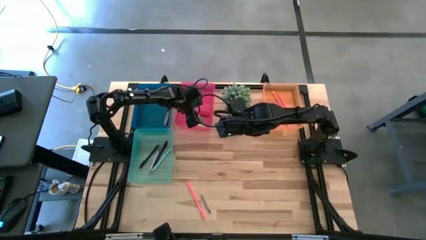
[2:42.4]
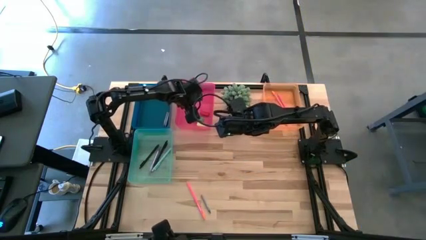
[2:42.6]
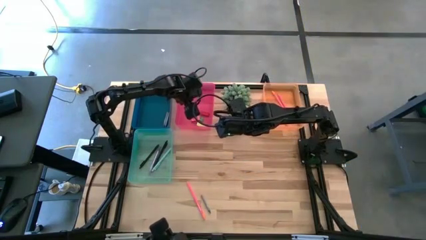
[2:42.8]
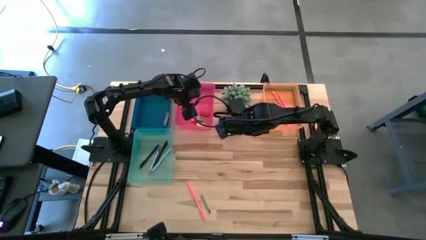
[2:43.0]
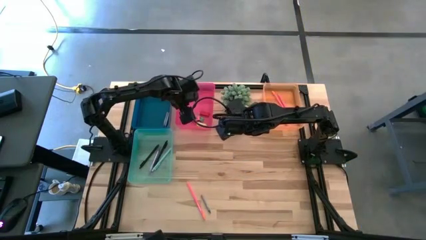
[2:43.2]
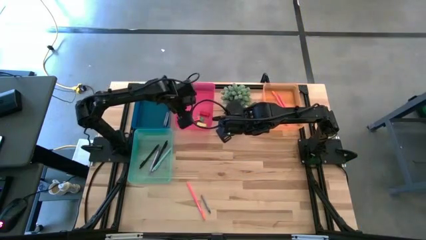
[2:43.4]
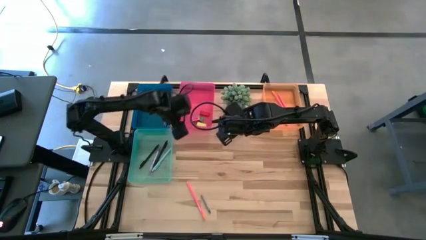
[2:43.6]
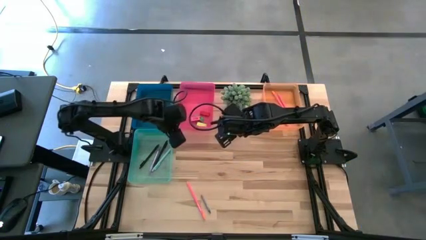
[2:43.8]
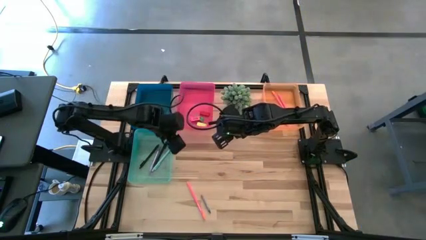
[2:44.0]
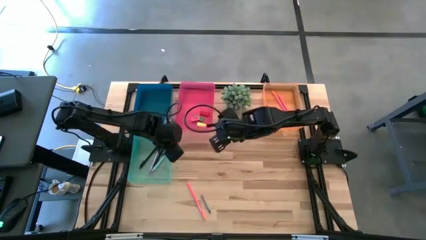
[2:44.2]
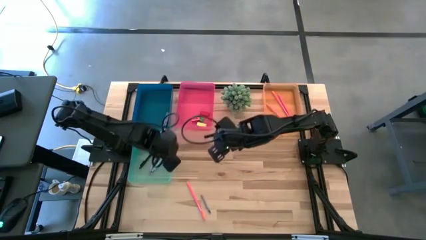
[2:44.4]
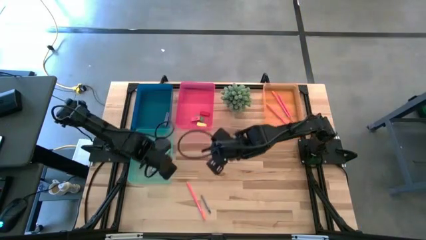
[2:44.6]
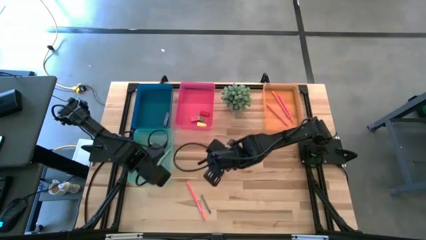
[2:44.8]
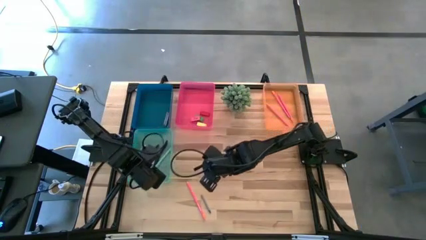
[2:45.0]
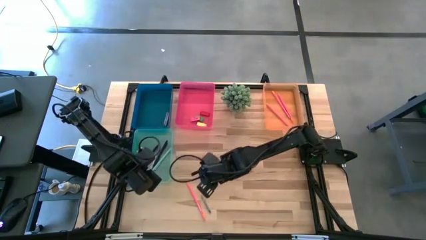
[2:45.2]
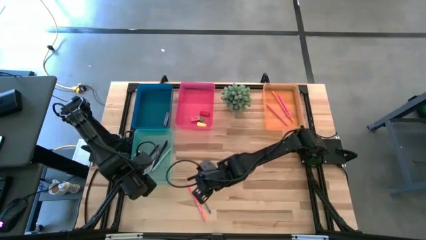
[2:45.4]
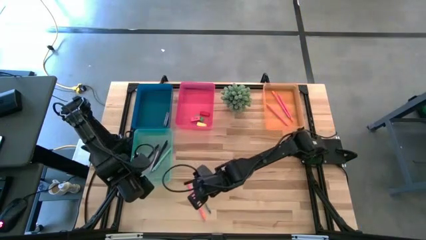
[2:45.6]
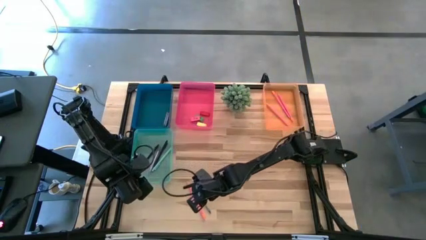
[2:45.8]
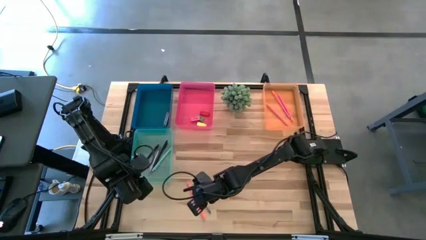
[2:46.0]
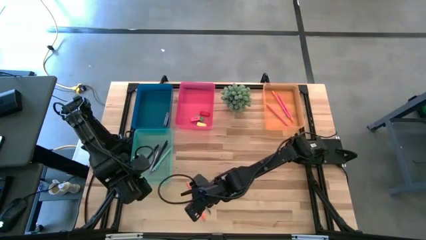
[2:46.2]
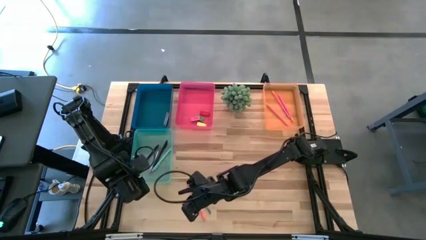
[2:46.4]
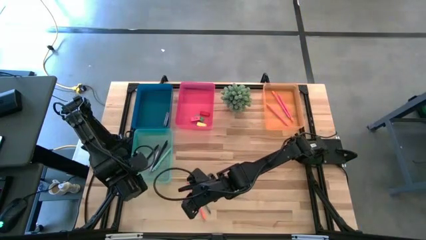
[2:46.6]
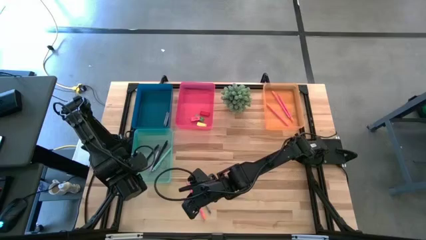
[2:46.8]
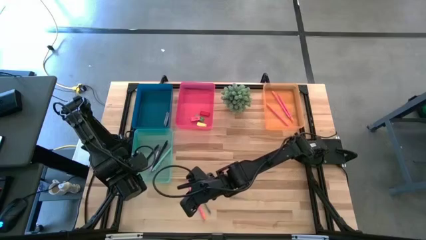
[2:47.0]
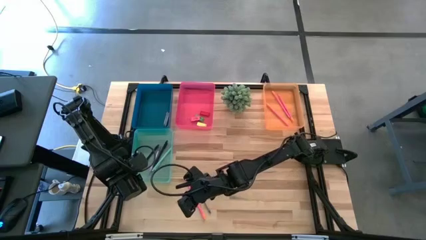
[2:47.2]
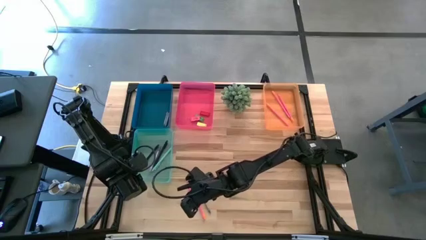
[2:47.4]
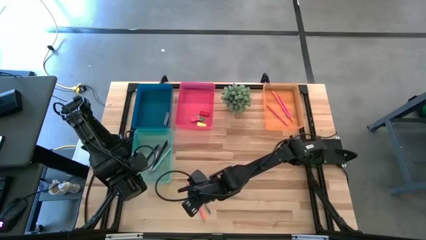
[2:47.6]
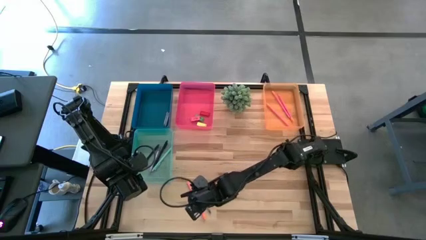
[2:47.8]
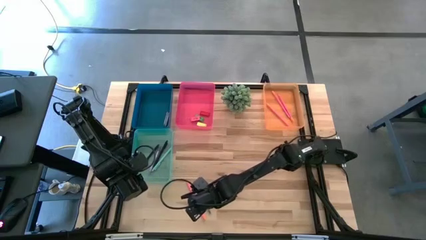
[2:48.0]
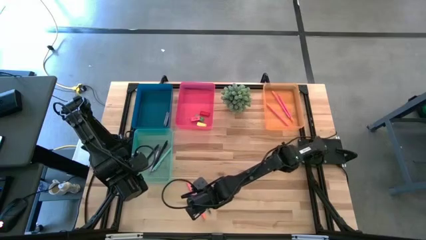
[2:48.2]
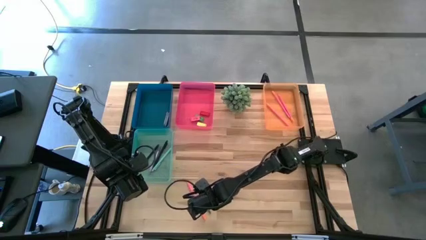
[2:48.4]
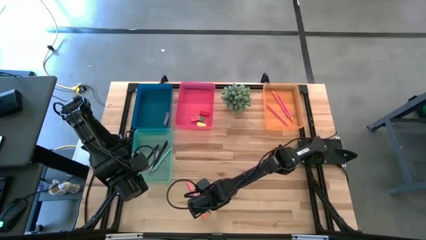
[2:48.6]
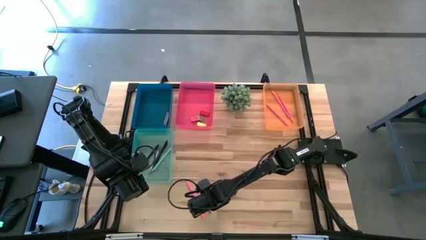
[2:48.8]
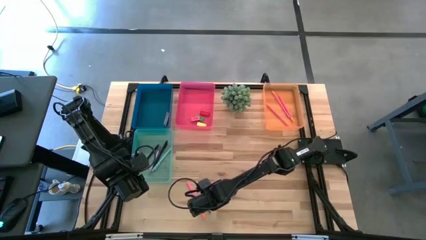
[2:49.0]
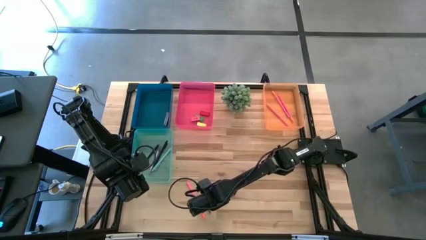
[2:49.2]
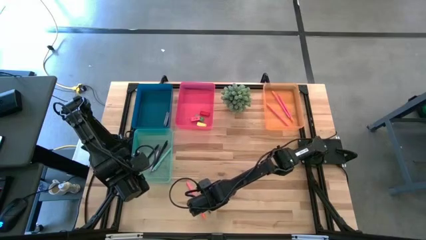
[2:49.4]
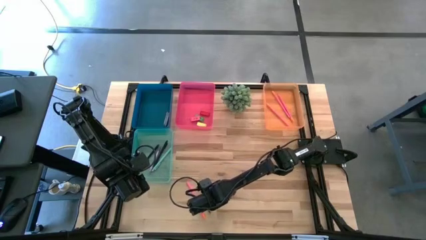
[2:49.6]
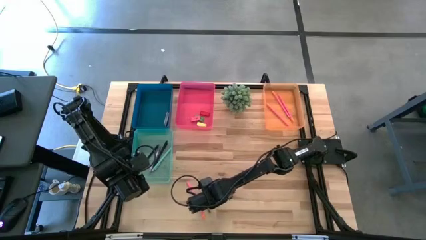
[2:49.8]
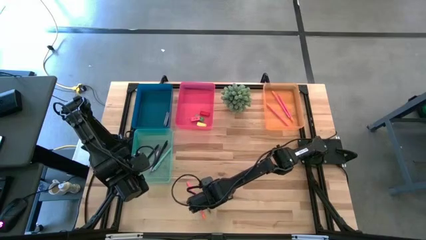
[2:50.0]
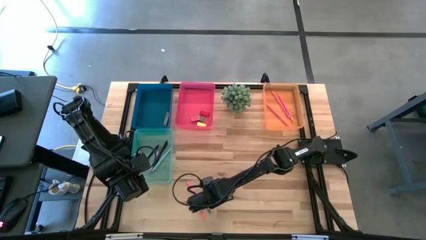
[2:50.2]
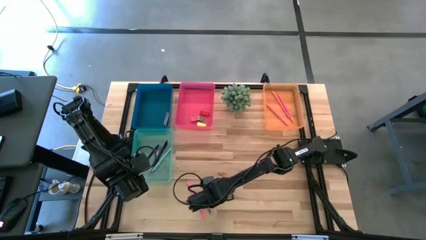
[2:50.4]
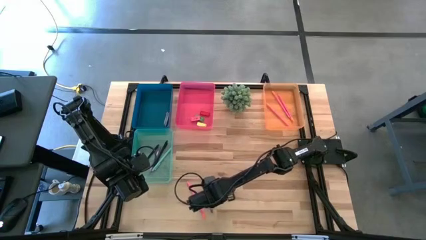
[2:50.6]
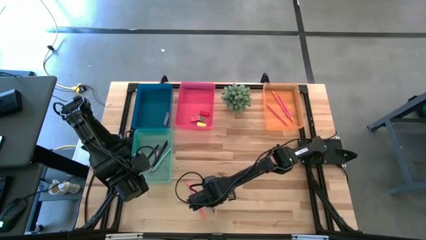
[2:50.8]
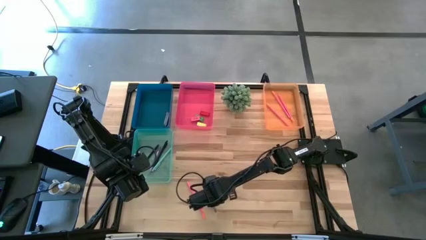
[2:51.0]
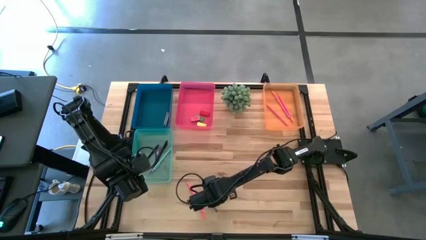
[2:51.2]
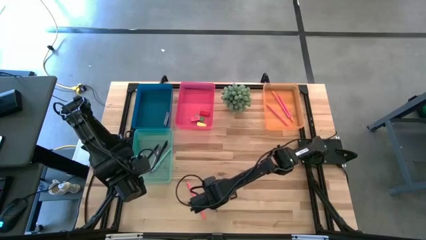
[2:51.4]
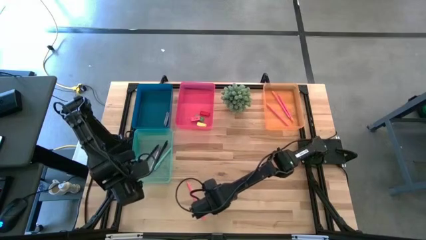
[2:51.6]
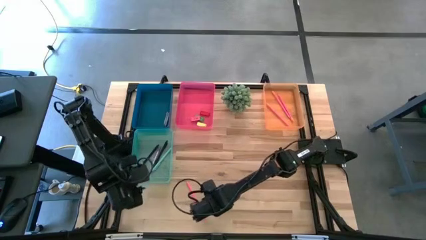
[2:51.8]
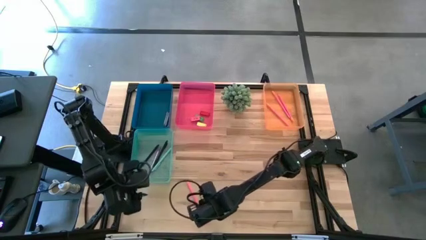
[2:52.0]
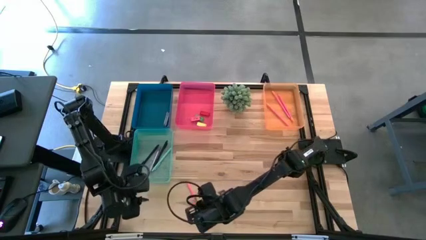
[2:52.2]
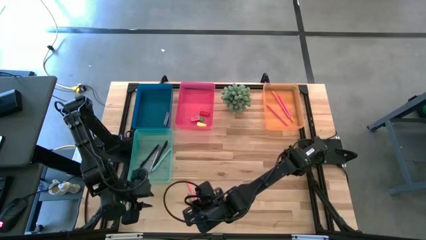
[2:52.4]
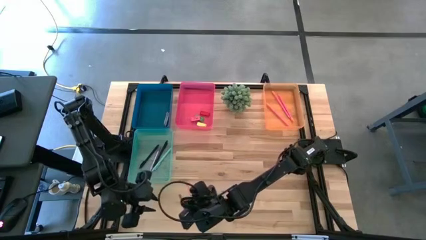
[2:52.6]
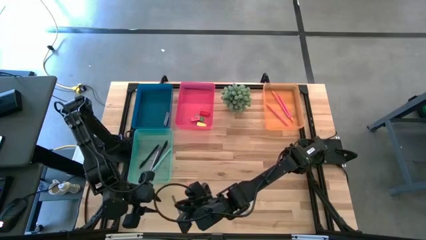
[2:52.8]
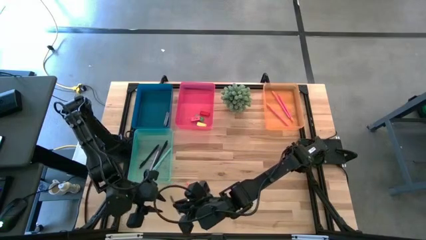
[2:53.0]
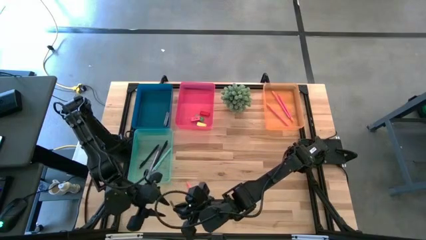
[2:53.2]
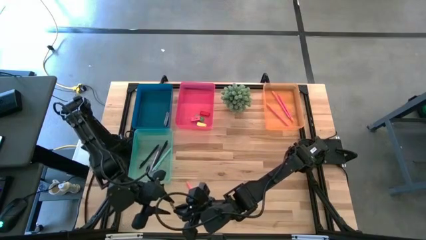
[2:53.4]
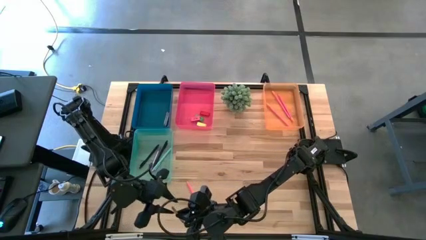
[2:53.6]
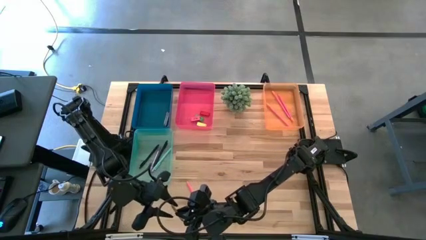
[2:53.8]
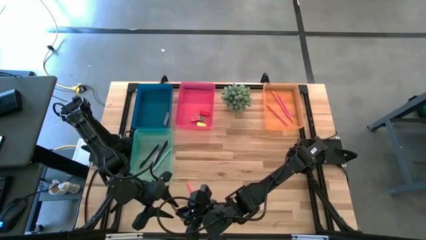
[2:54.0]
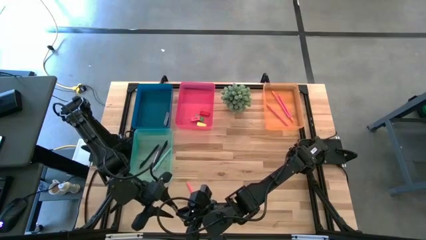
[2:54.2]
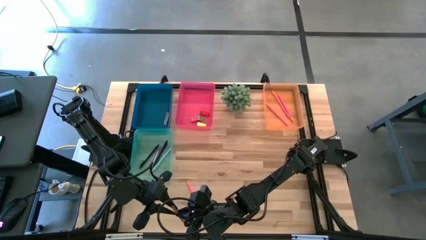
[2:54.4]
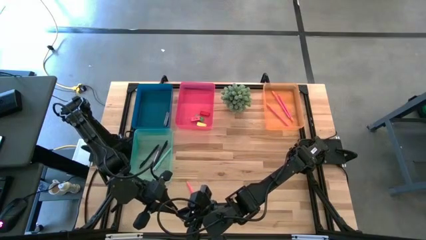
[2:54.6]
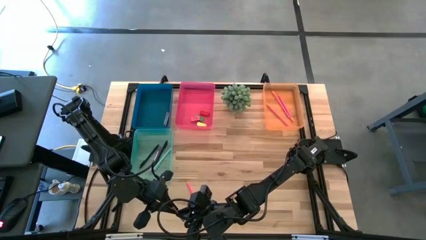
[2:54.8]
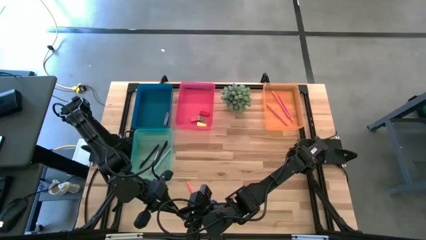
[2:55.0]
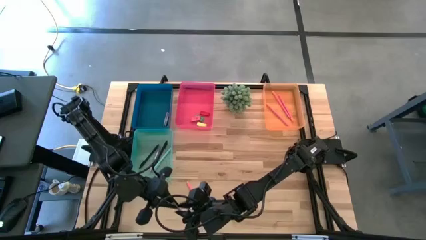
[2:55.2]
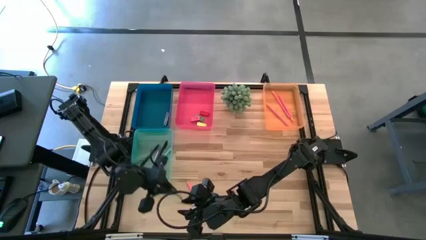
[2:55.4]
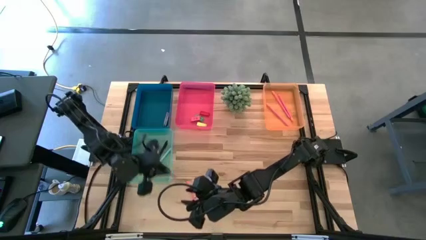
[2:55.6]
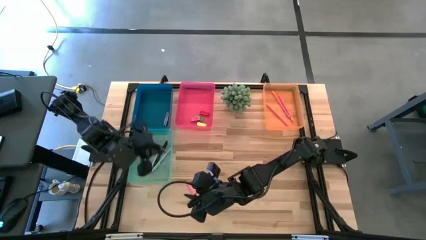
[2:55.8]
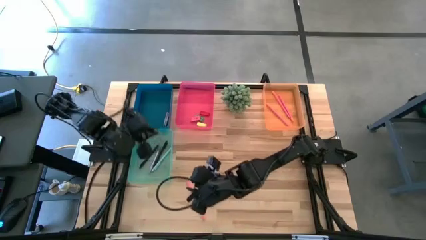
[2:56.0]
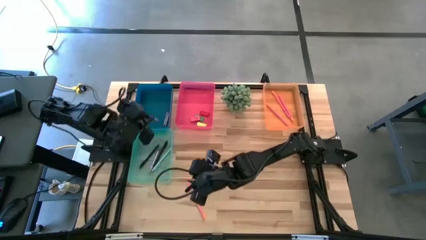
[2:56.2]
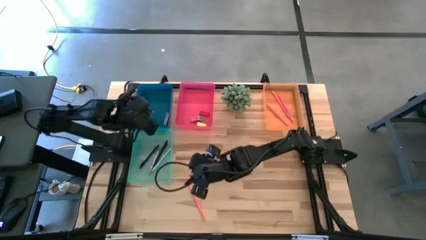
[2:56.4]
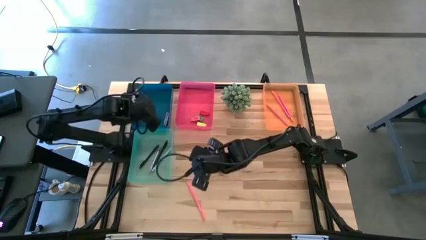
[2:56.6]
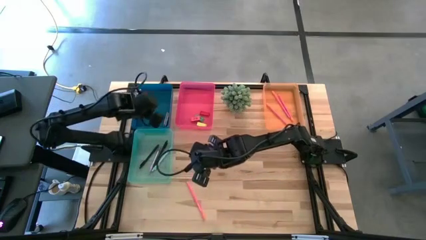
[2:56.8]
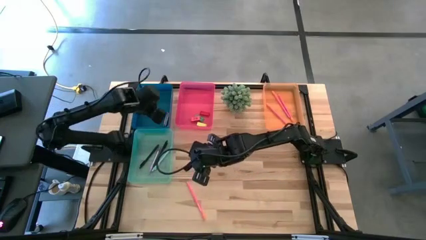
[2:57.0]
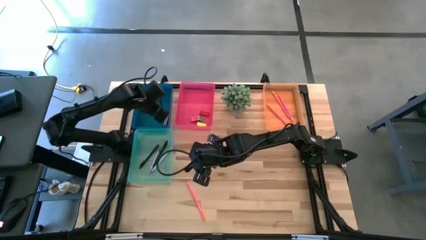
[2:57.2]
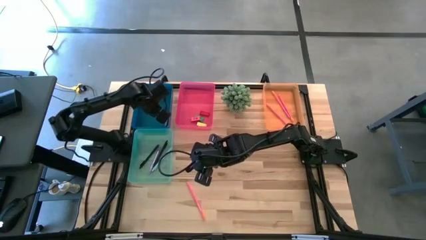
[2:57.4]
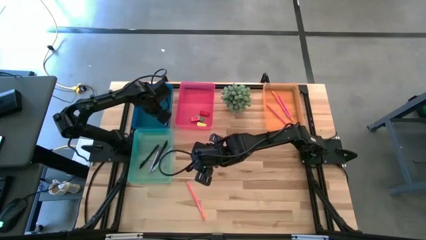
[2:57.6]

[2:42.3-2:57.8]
Task: Sort crayons/erasers/pens/pencils in bins
Put the gray crayon into the blue bin

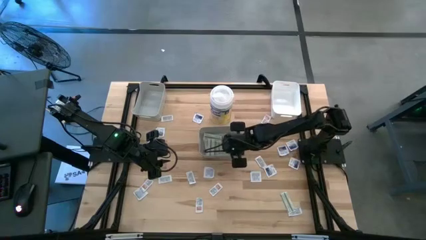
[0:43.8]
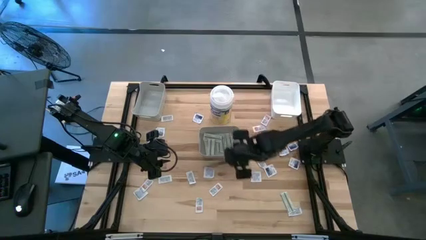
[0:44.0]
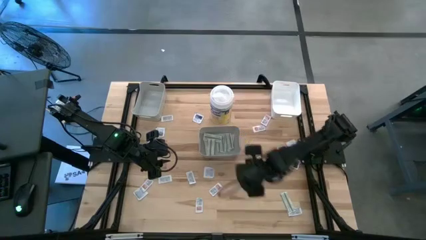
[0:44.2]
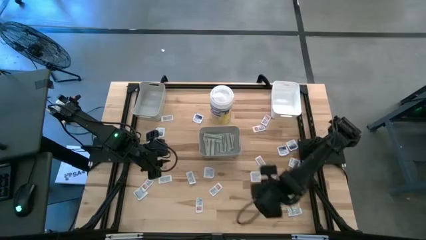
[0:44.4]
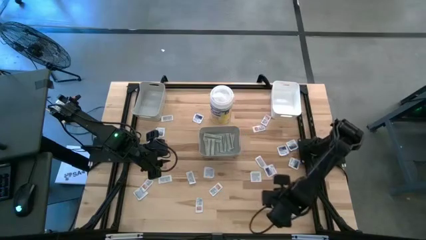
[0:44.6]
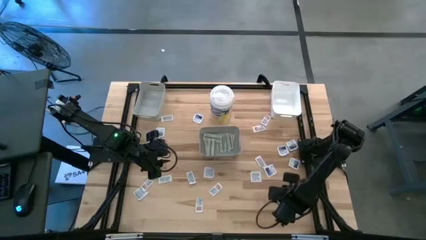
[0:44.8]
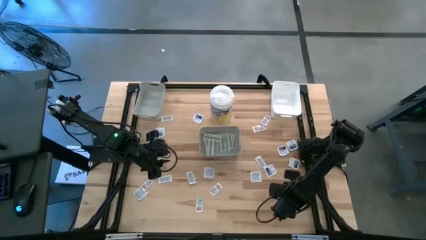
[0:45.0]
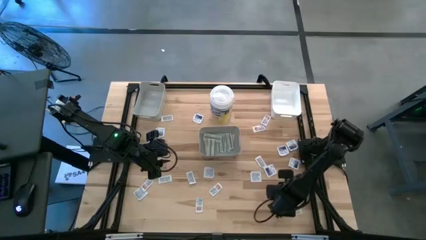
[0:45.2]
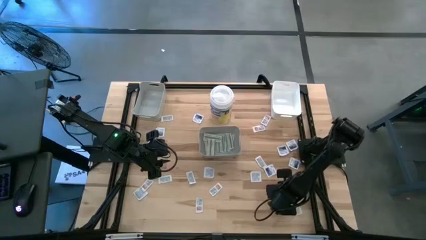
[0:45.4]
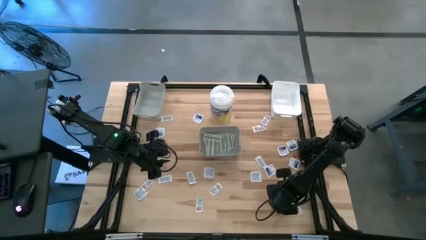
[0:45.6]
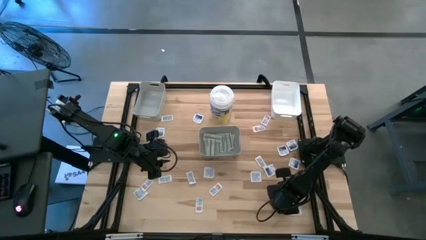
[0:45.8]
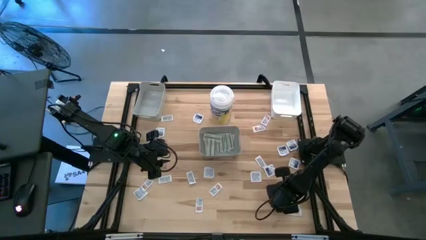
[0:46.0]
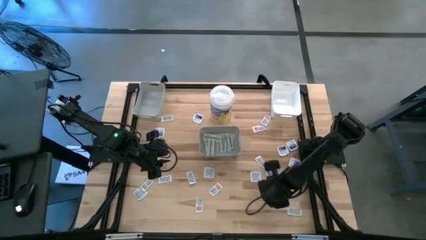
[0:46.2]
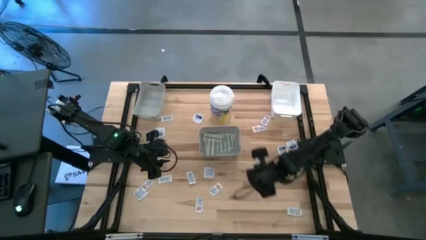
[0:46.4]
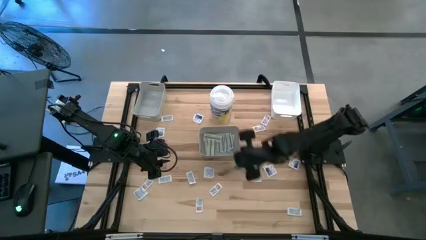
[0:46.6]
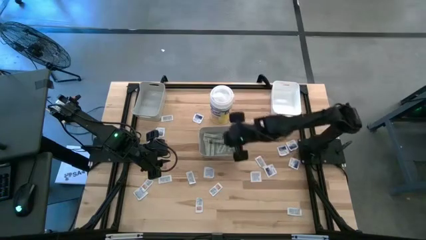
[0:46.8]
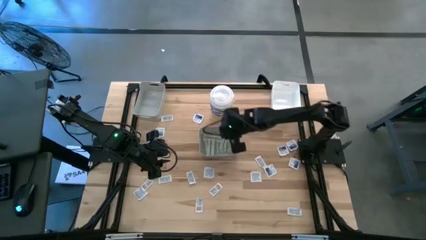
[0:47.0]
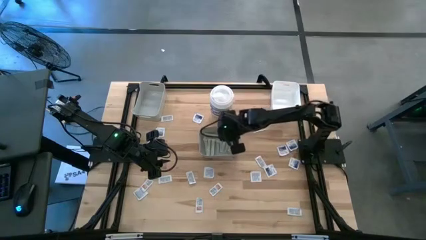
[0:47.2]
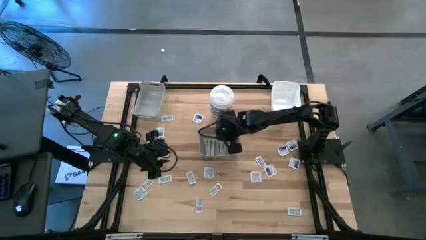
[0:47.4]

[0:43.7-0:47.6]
Task: Pick & Place First Aid Supplies
Put the bandage into the bottom gray bin
